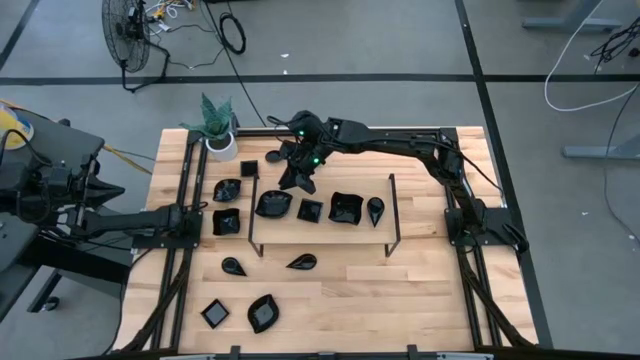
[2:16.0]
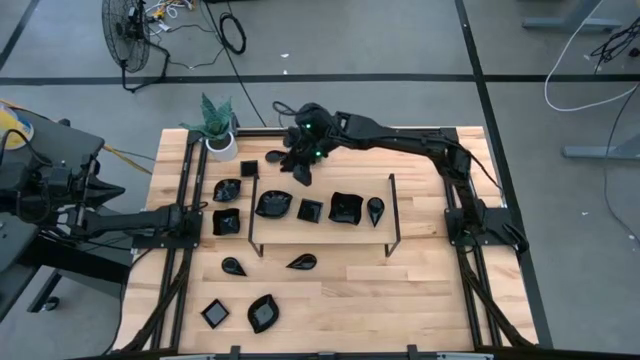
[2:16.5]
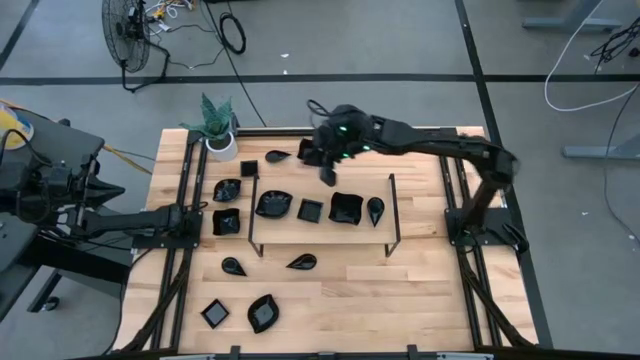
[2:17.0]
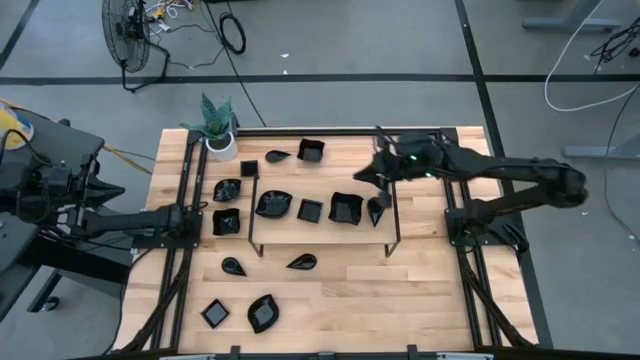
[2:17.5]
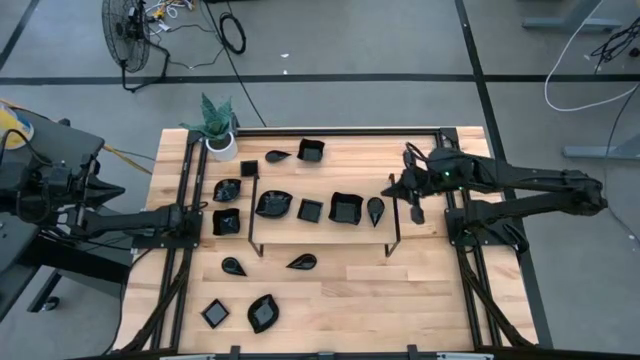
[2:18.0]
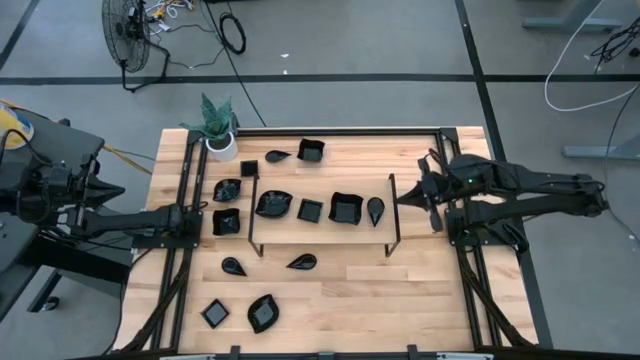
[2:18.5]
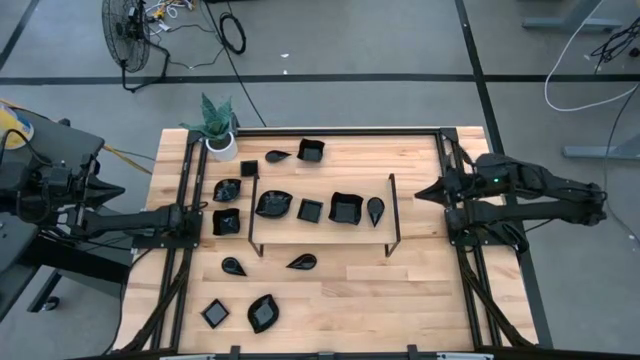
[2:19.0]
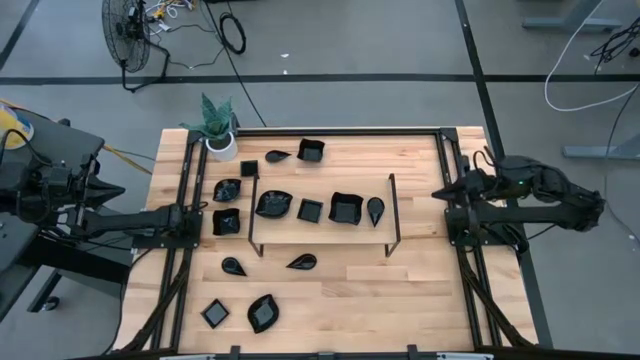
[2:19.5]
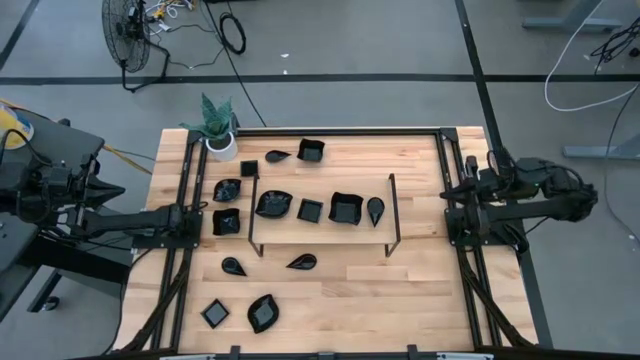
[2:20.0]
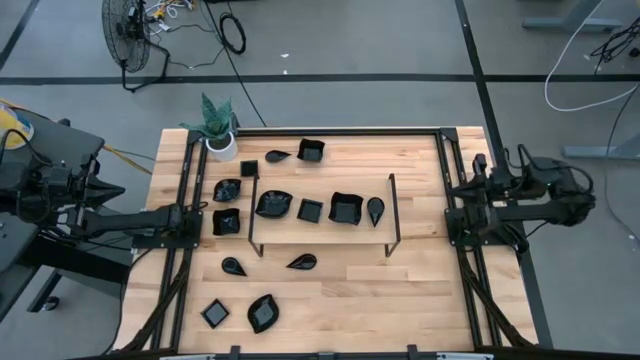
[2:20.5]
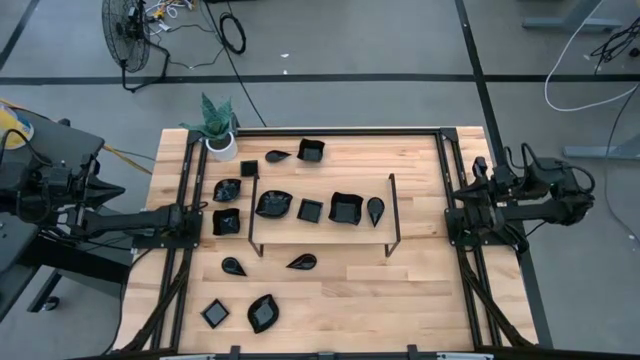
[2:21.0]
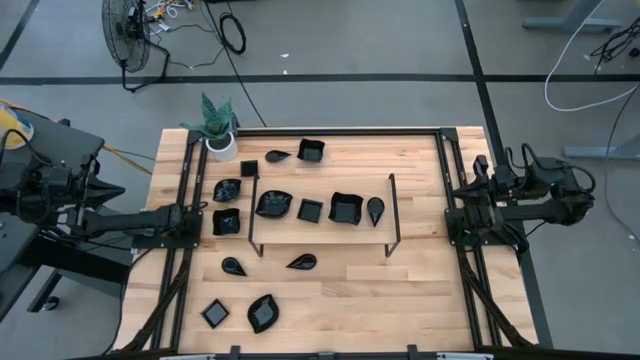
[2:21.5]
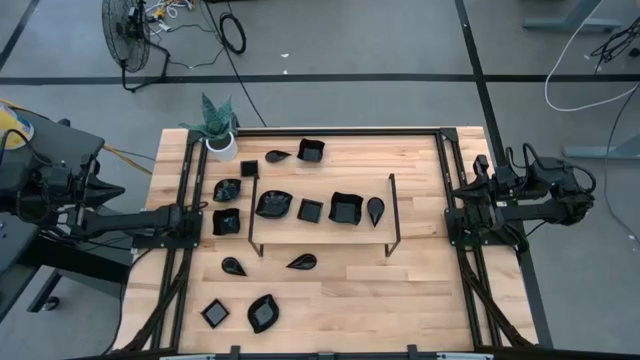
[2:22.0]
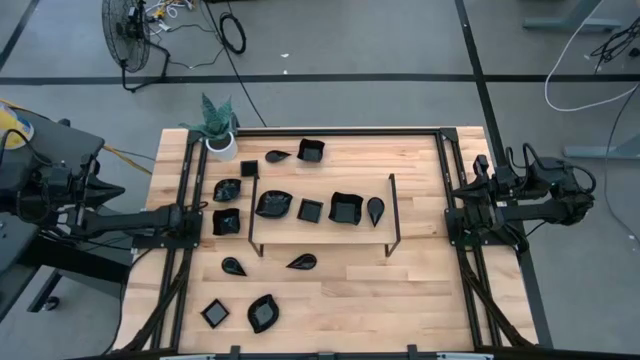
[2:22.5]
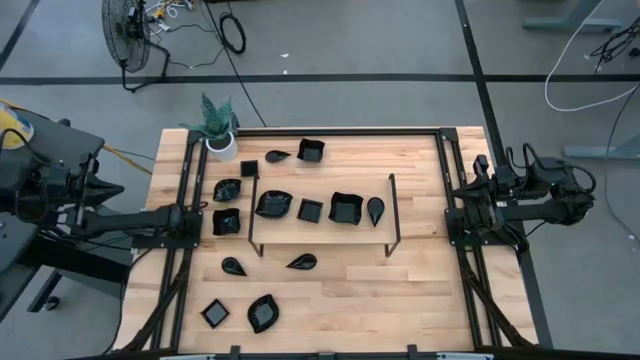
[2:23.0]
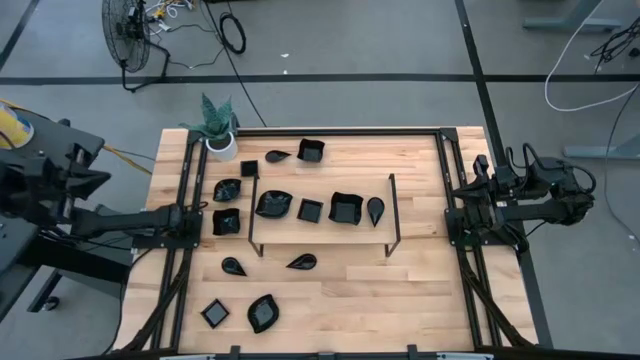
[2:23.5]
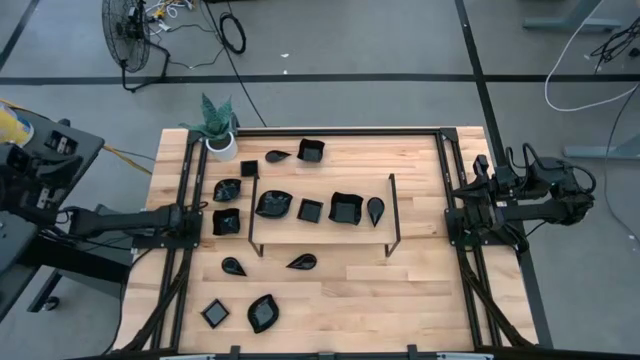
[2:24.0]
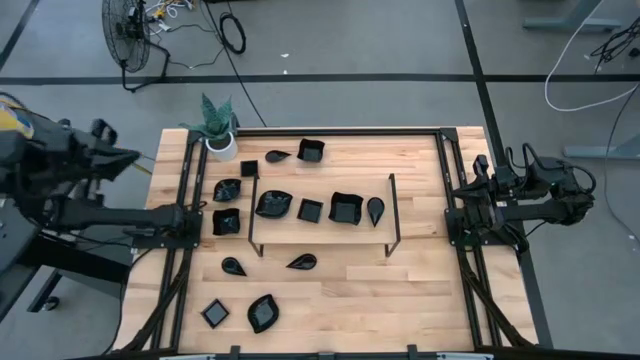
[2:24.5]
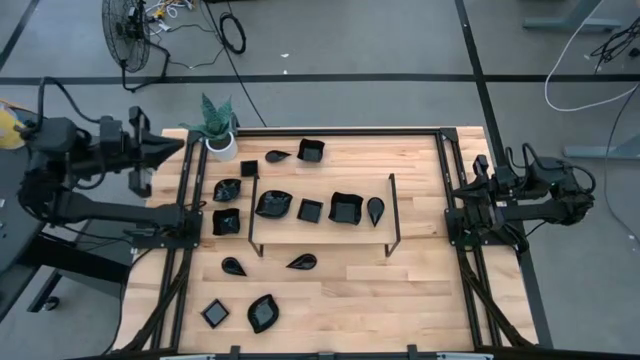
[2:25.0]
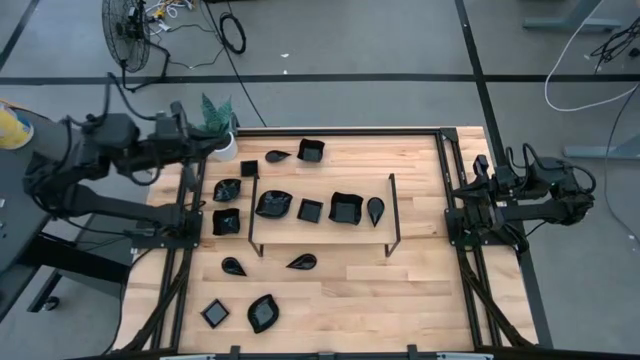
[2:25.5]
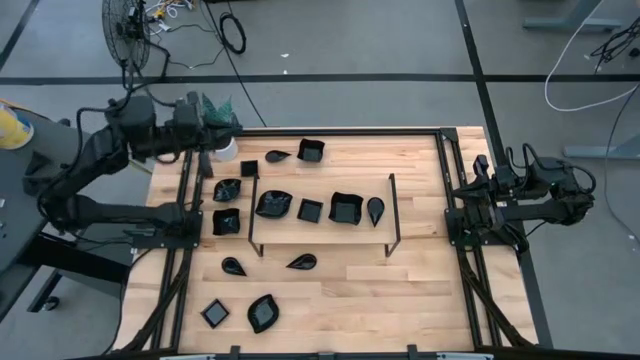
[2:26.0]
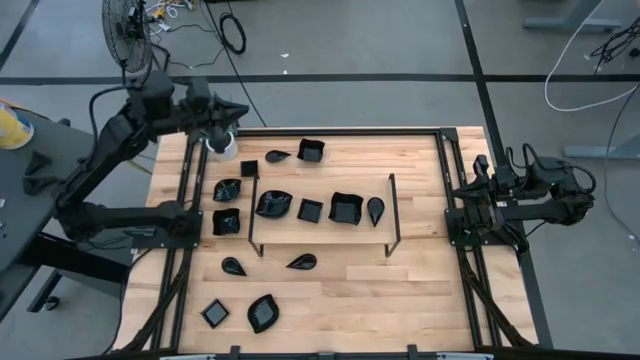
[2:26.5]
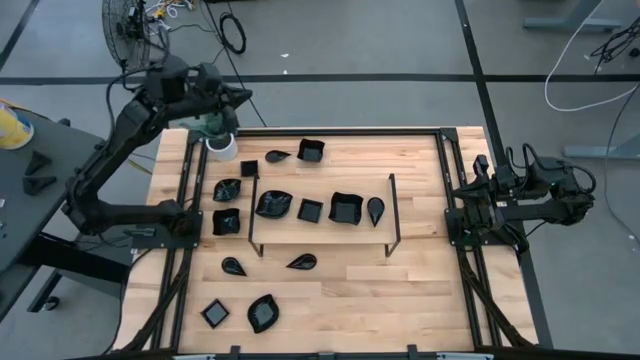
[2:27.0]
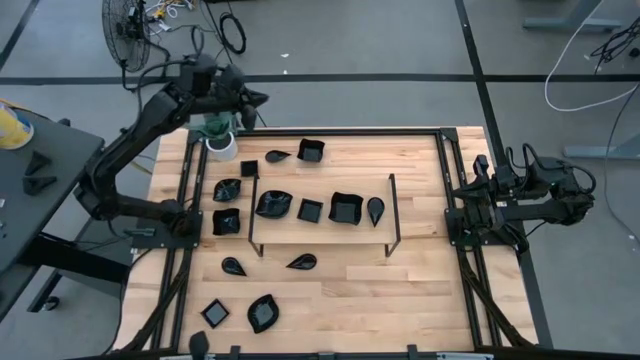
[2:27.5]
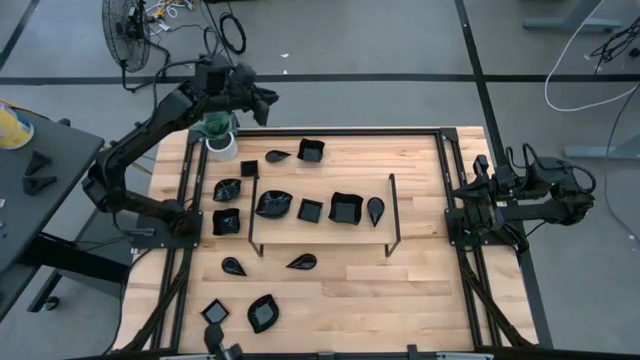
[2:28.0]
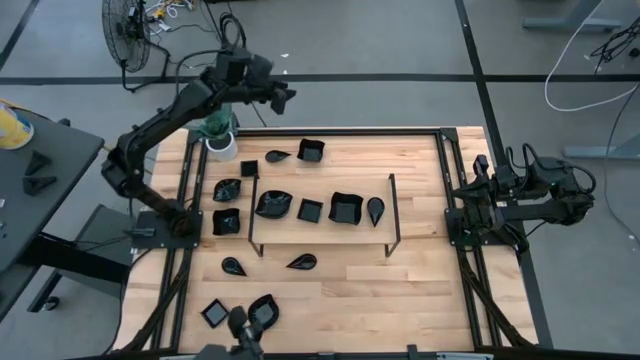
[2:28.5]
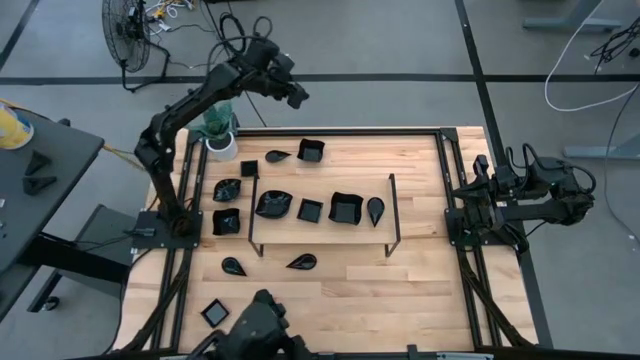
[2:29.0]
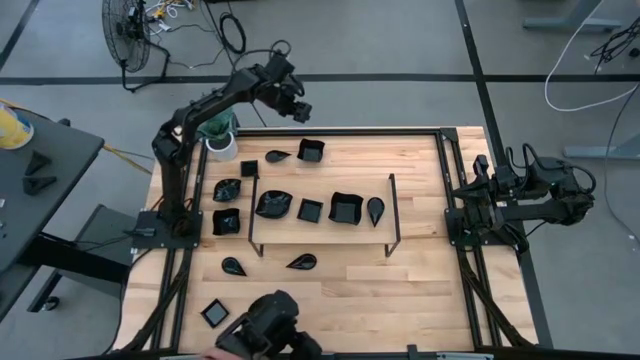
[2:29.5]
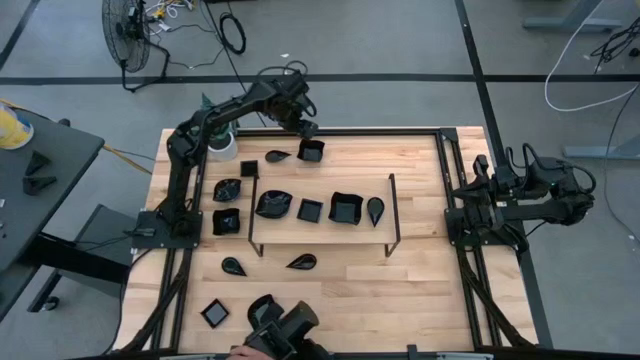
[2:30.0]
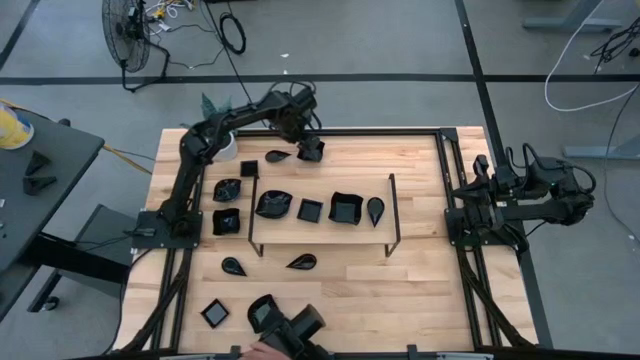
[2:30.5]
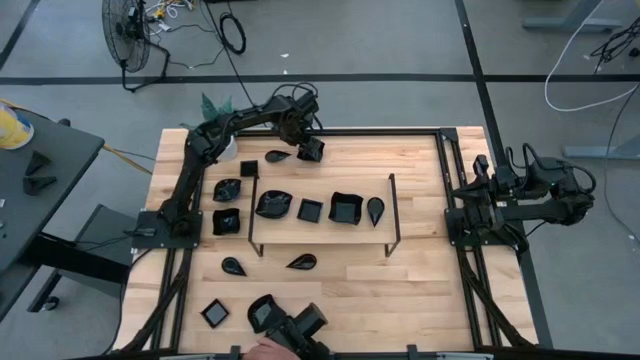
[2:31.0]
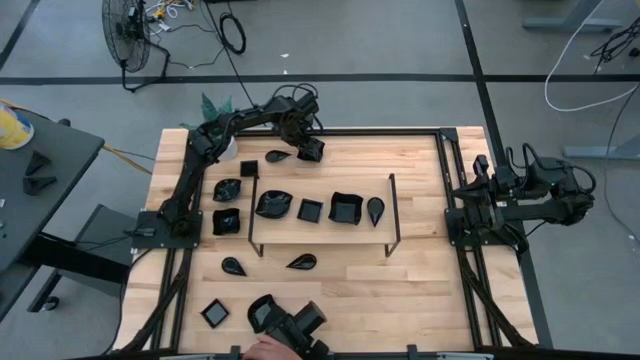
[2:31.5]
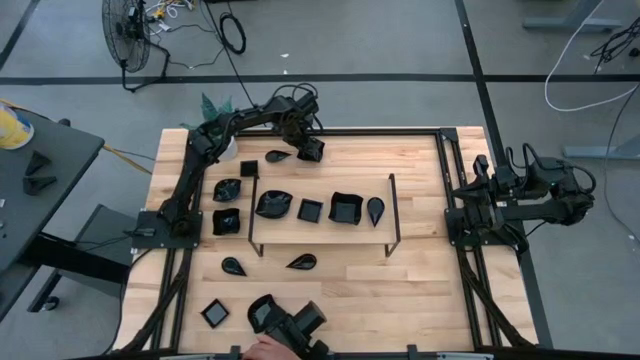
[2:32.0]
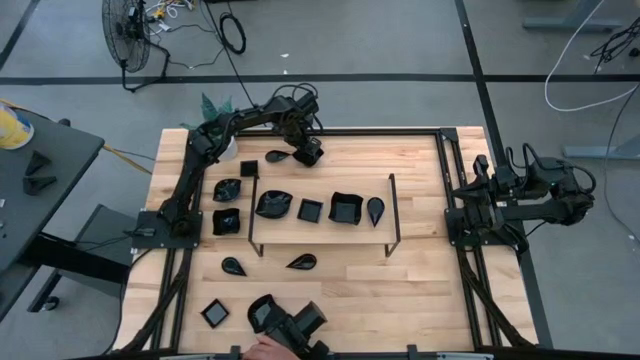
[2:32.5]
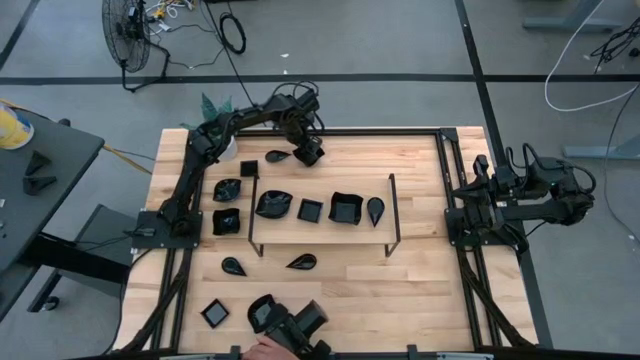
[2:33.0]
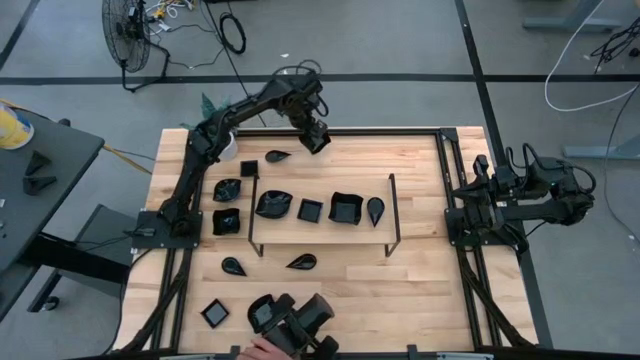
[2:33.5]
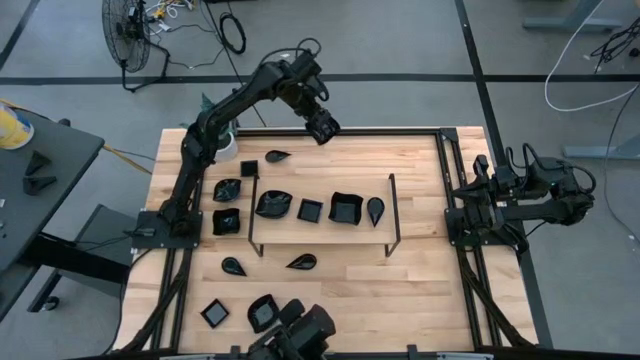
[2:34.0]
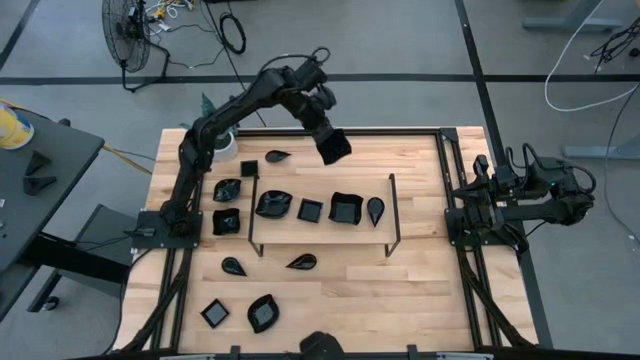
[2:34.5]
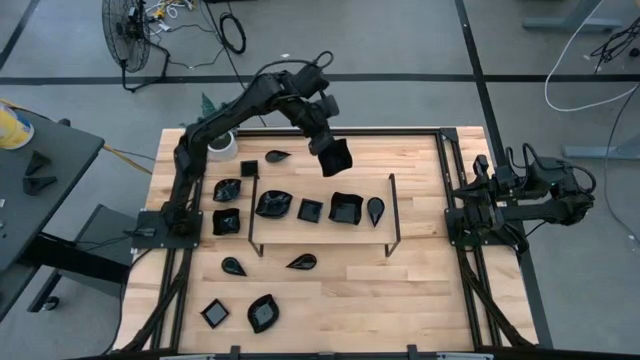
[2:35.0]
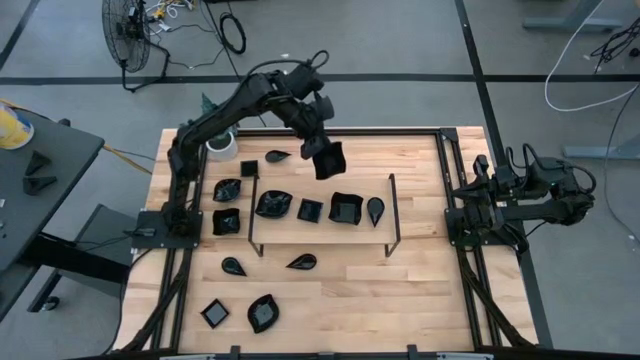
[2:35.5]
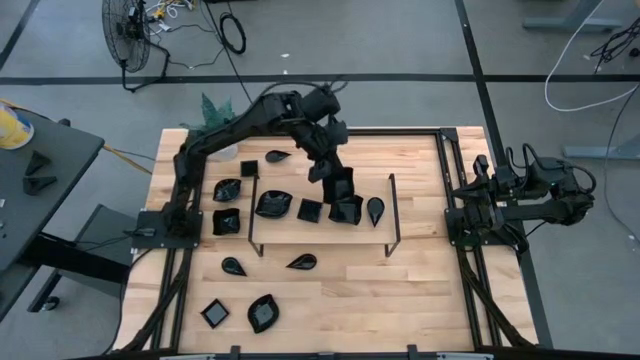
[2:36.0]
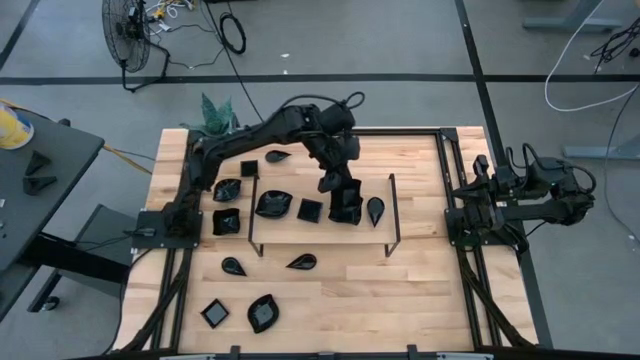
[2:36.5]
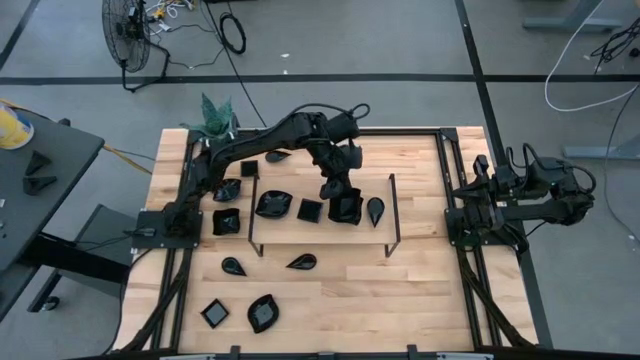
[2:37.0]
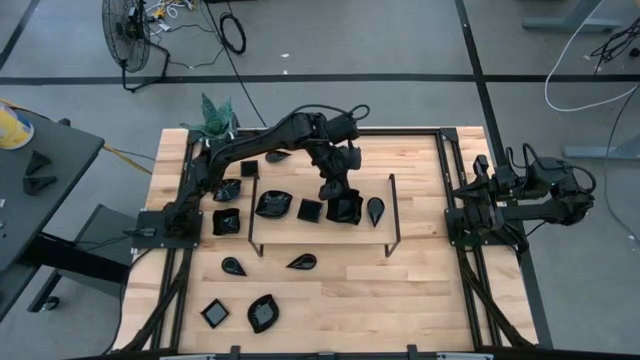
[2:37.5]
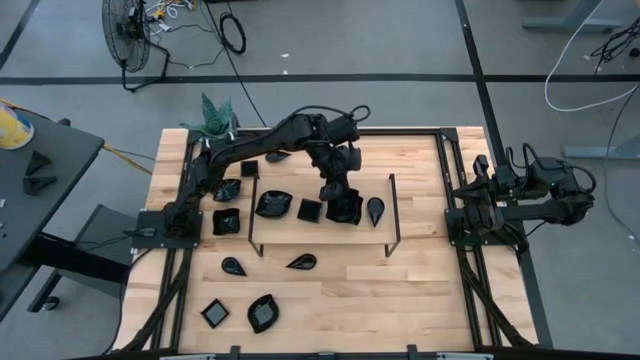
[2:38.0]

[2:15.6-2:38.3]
Task: Pick & Place Mini shaped plates
Stack the distorted square plate on top of the distorted square plate on the shelf
